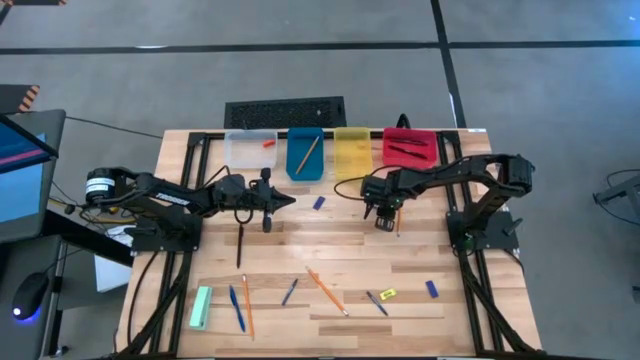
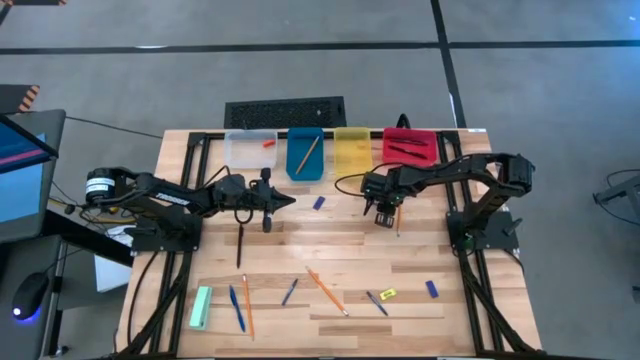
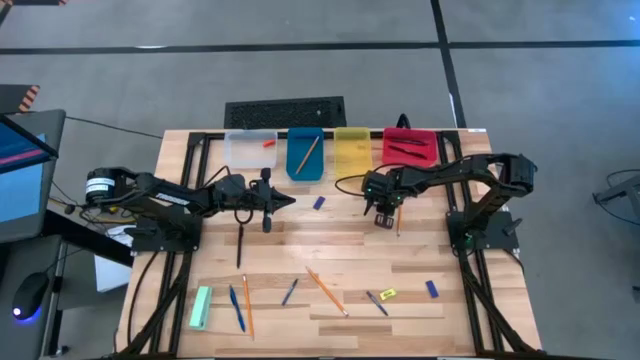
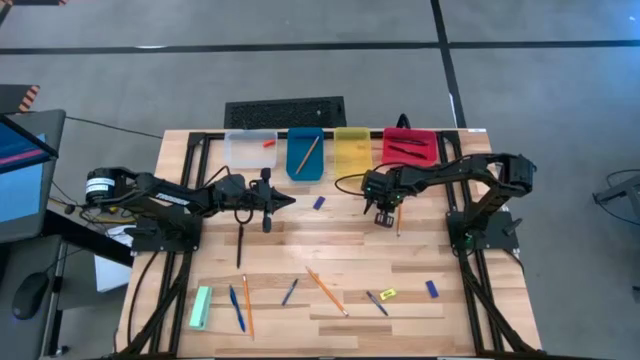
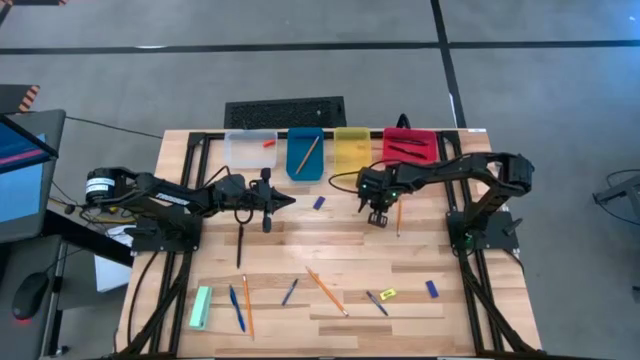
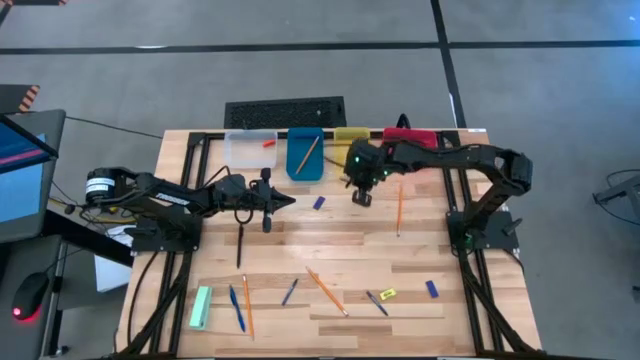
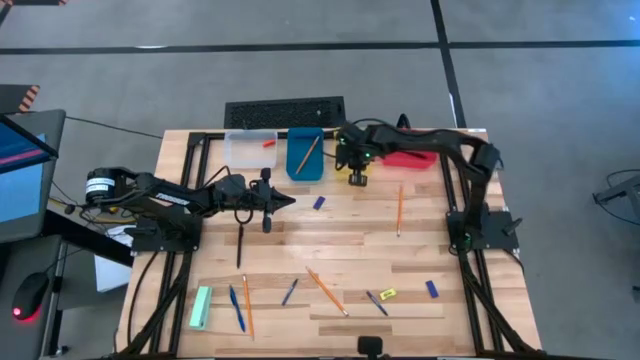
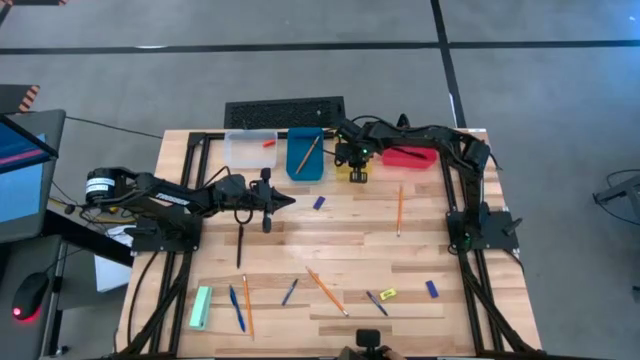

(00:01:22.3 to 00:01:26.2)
Task: Sort crayons/erasers/pens/pencils in bins
Put the blue crayon into the yellow bin

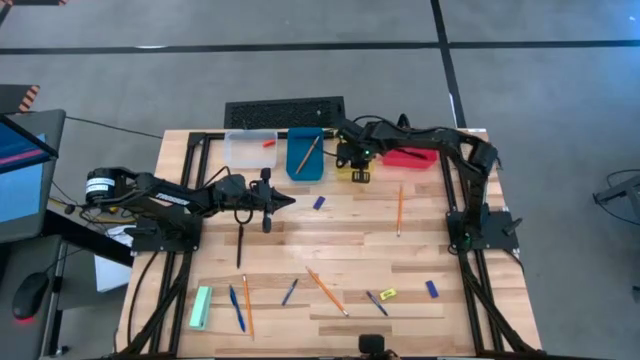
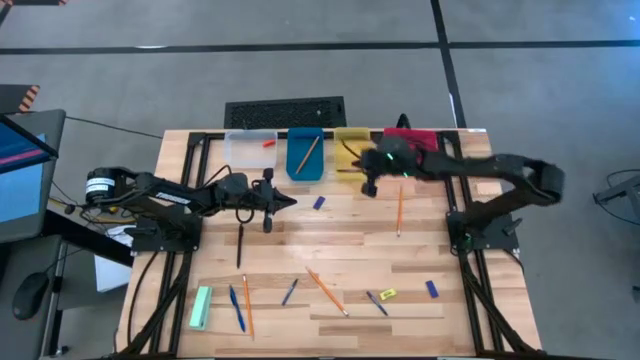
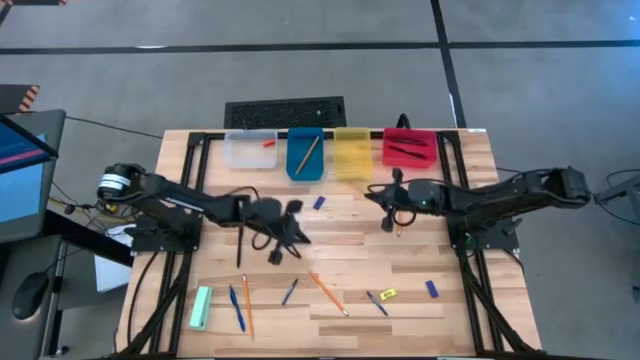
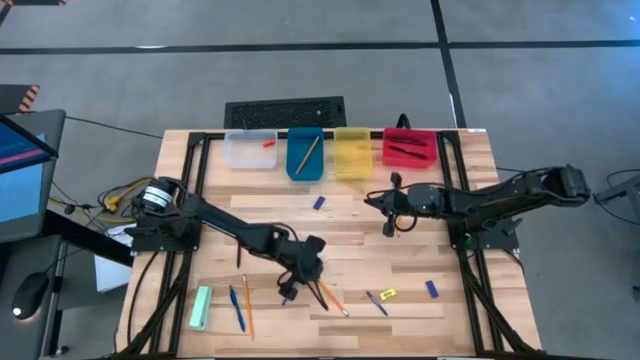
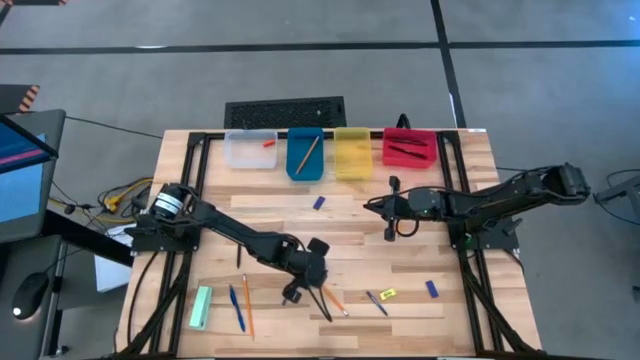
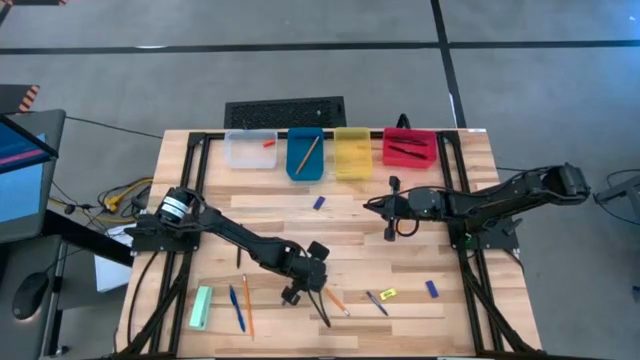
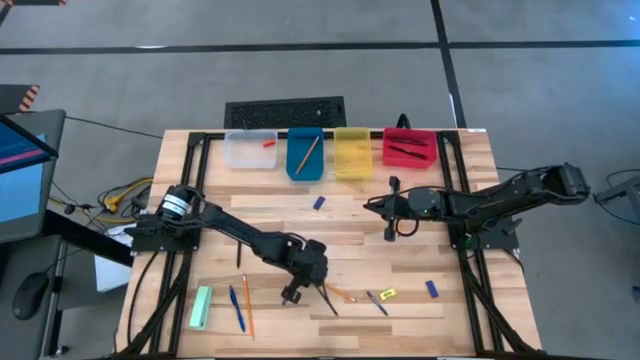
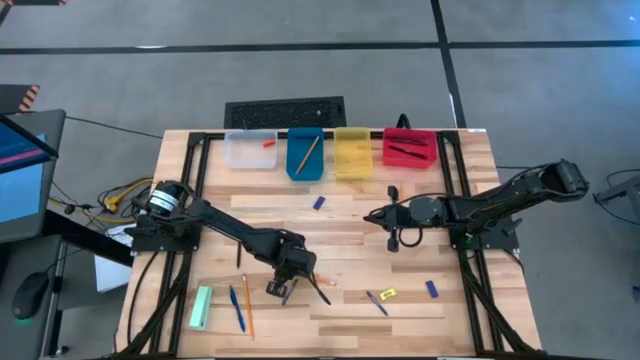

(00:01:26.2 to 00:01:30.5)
Put the orange pencil into the blue bin

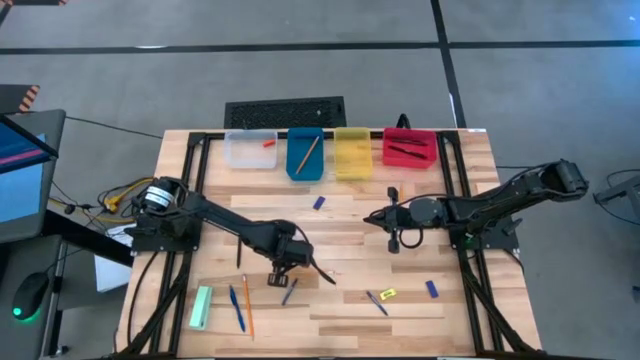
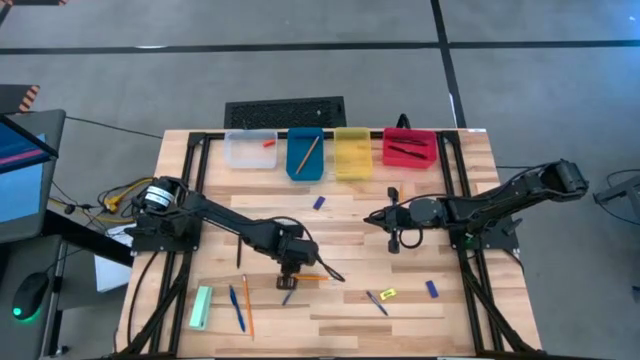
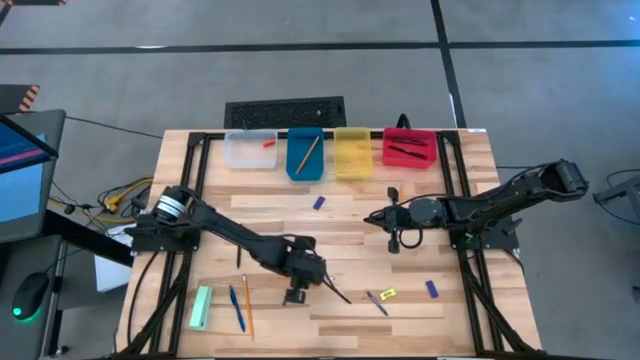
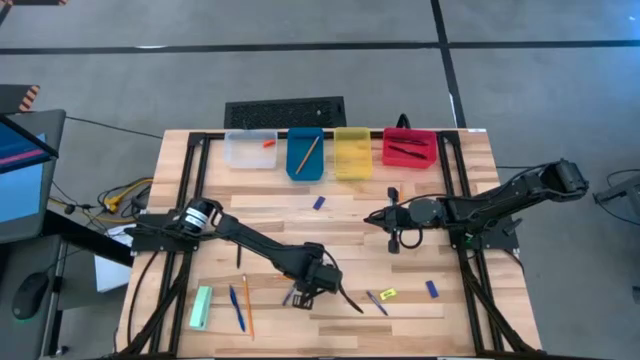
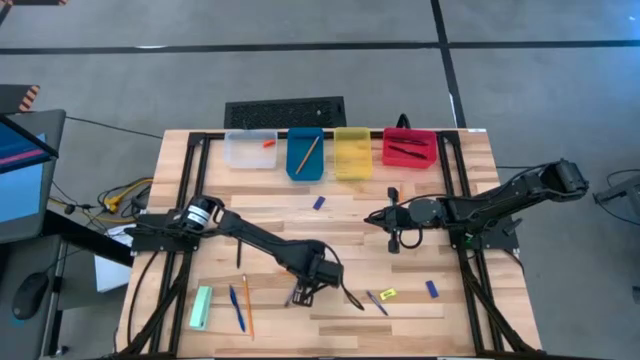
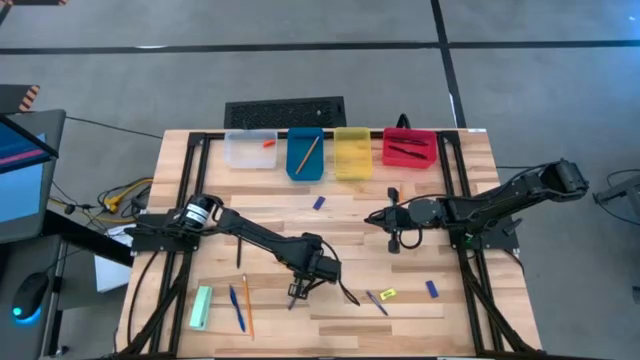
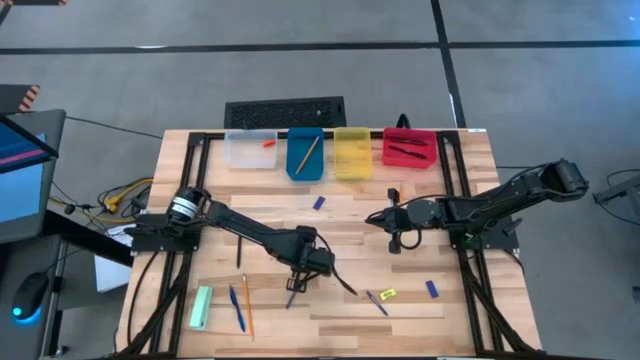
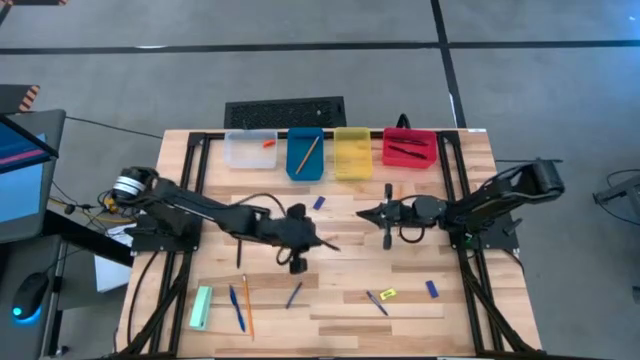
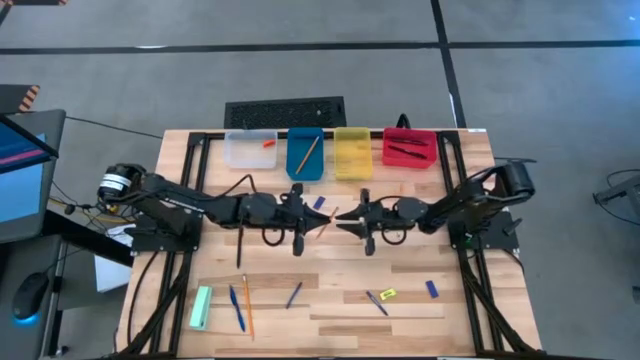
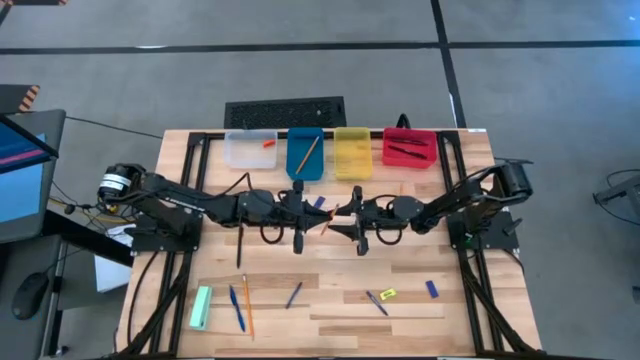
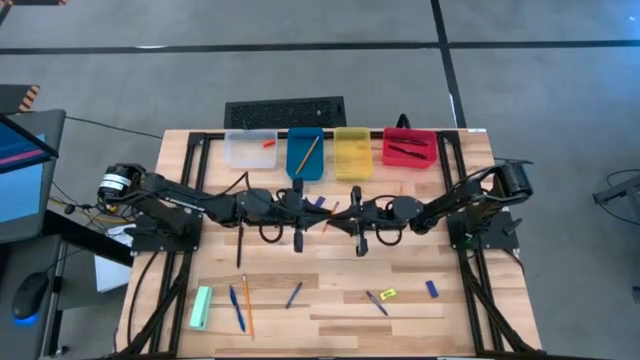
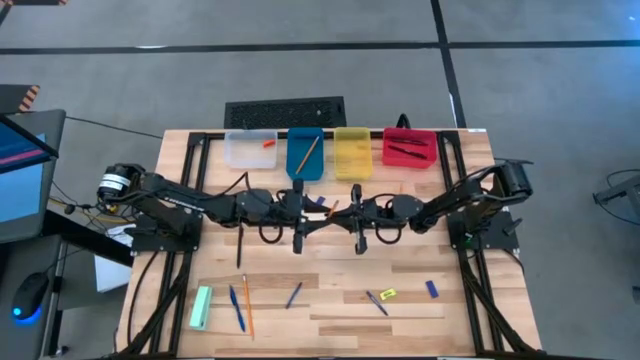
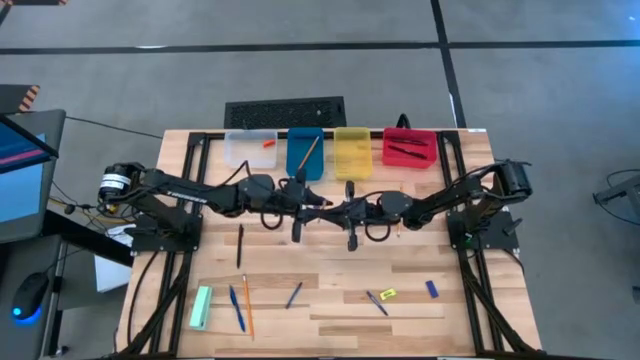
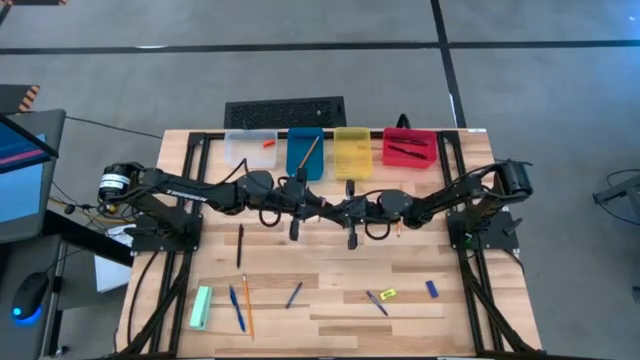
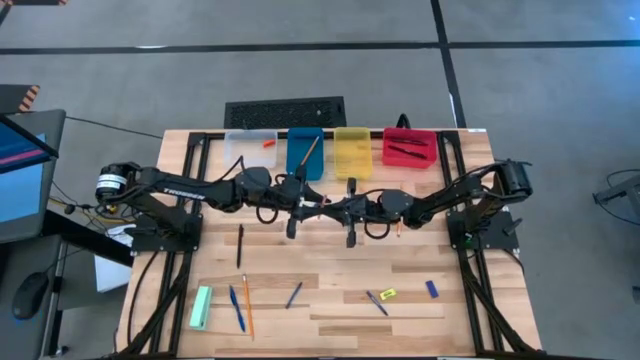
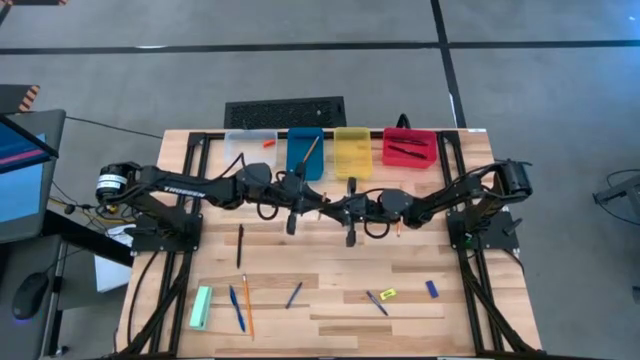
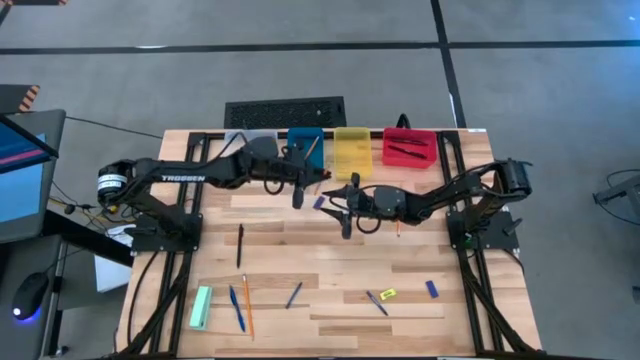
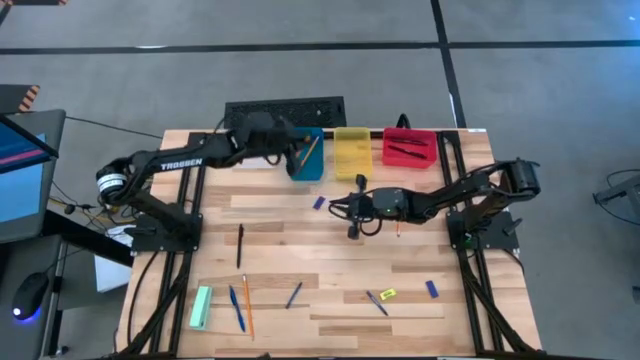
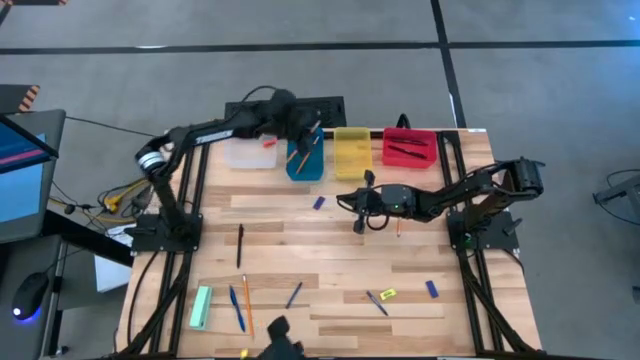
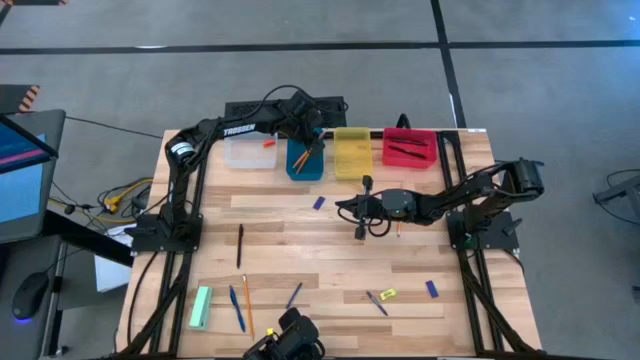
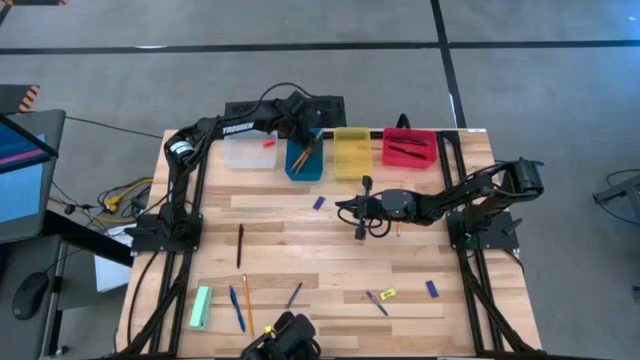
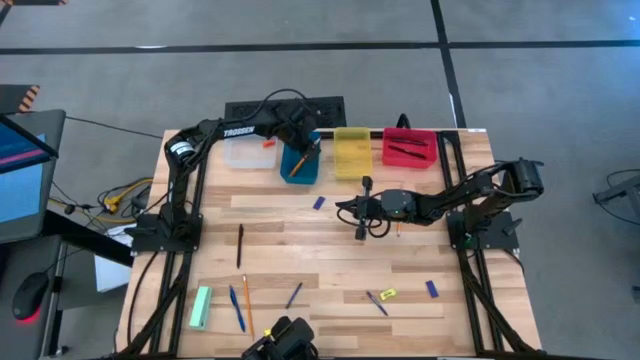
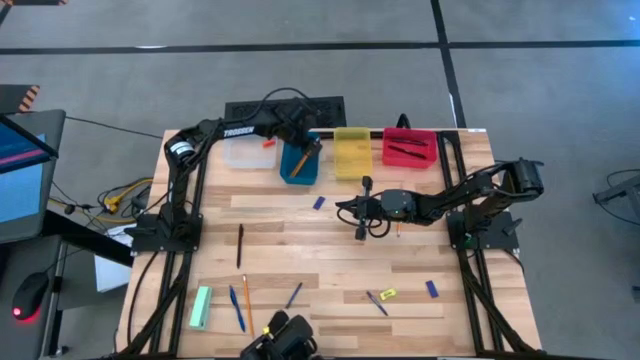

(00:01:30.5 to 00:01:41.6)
Put the orange pencil into the blue bin

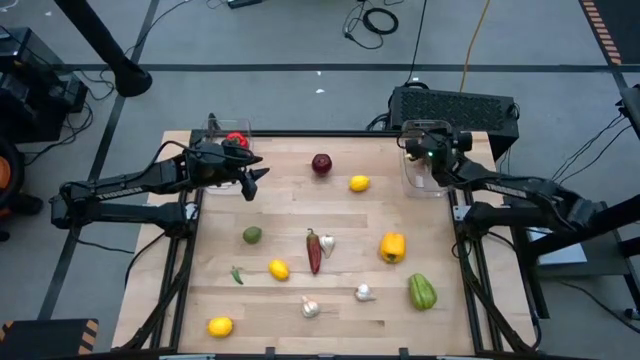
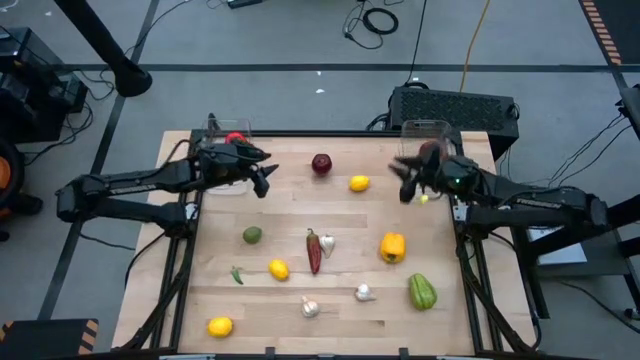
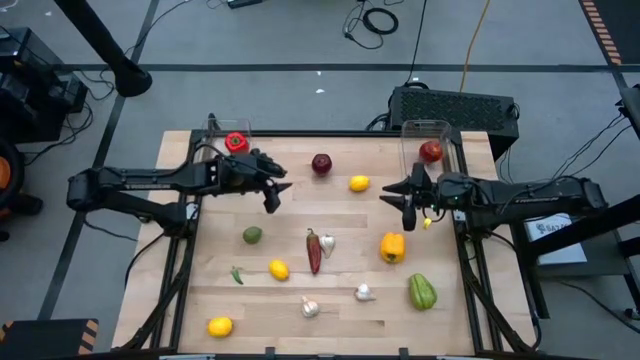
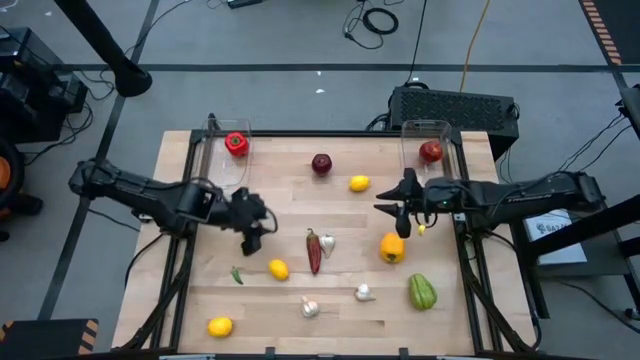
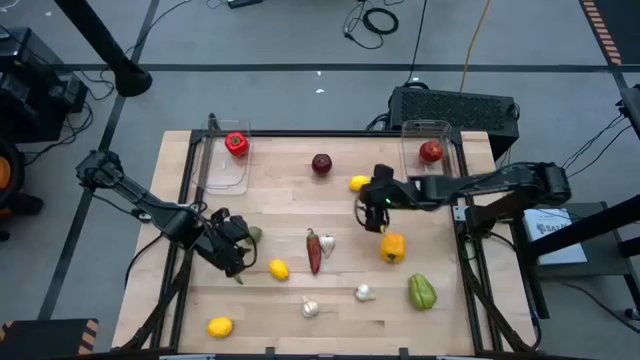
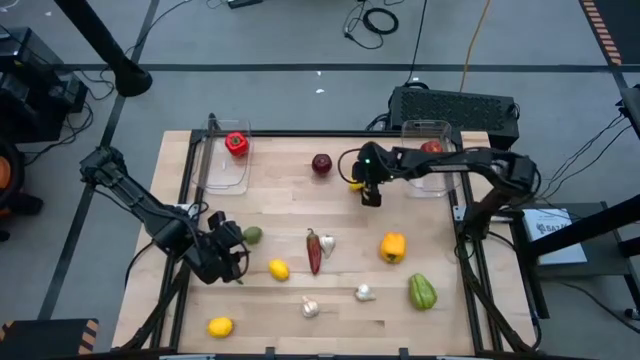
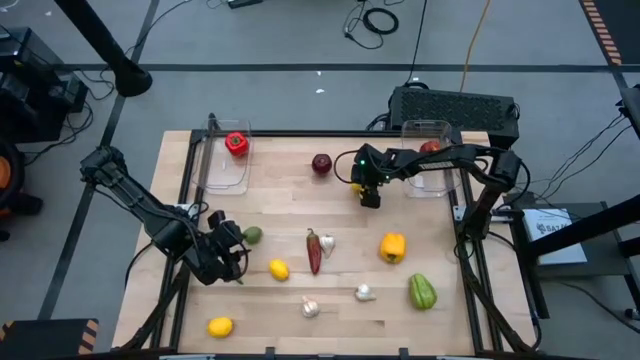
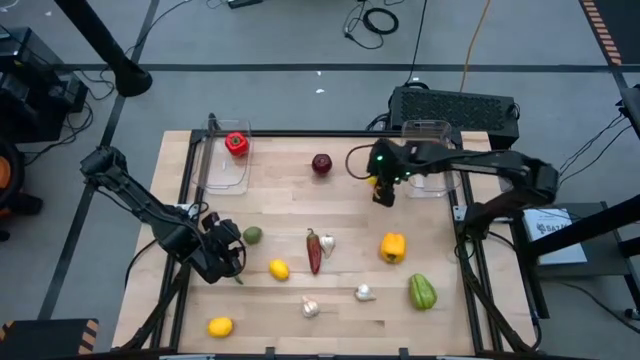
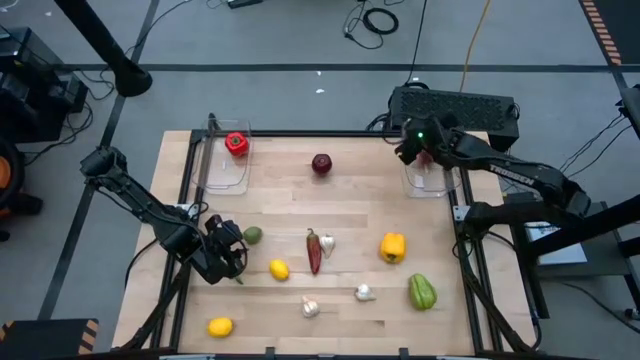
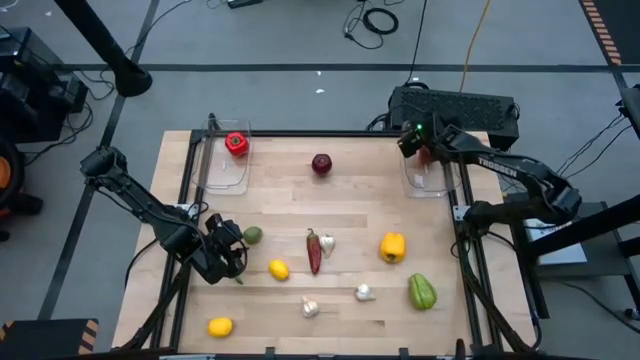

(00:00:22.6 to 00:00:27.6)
Task: Sort produce into baskets
Put the right lemon into the right transparent bin
